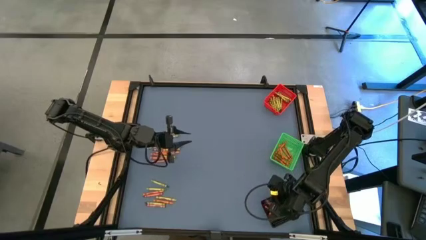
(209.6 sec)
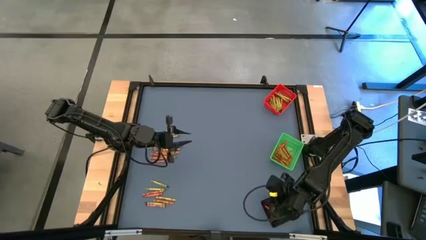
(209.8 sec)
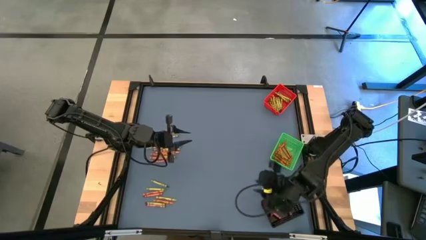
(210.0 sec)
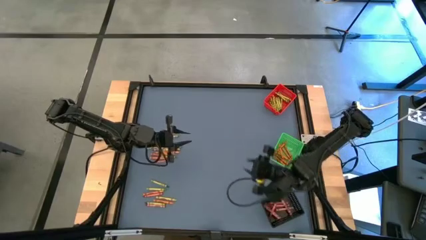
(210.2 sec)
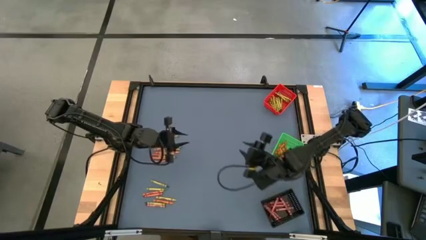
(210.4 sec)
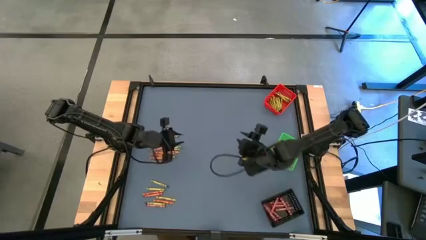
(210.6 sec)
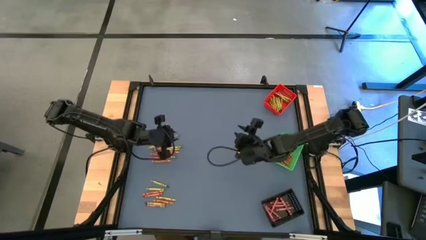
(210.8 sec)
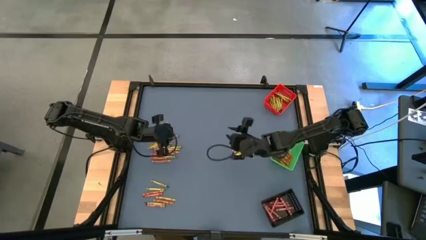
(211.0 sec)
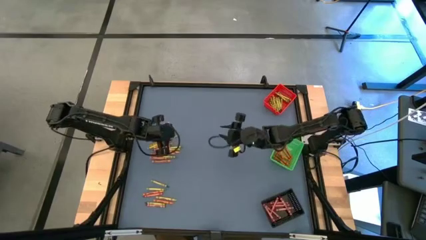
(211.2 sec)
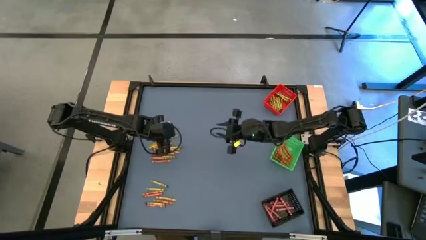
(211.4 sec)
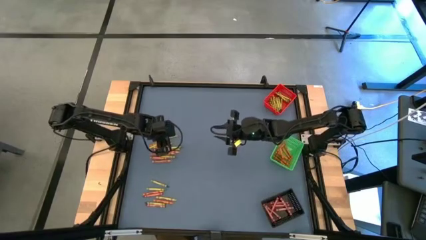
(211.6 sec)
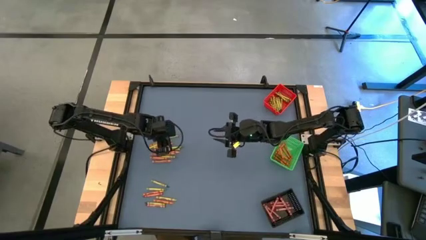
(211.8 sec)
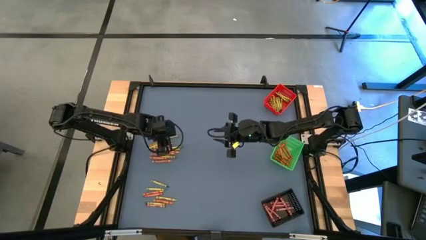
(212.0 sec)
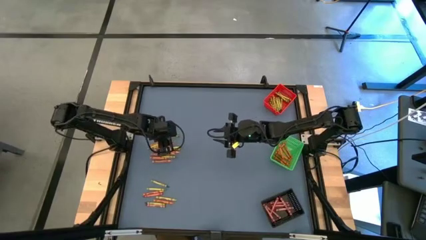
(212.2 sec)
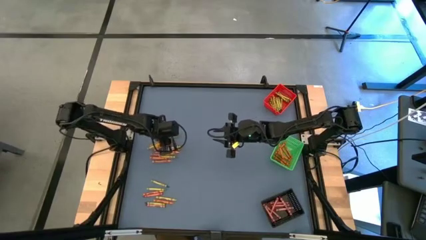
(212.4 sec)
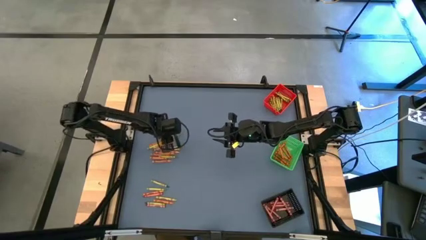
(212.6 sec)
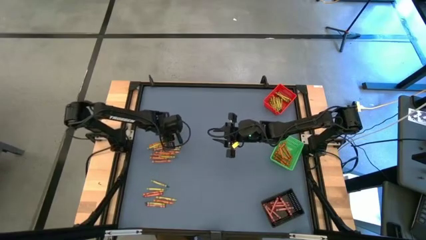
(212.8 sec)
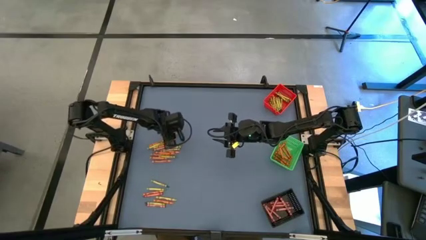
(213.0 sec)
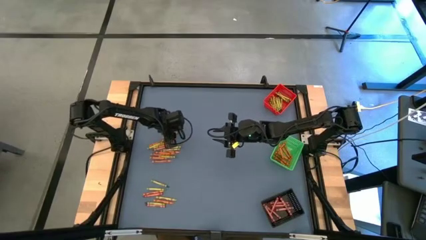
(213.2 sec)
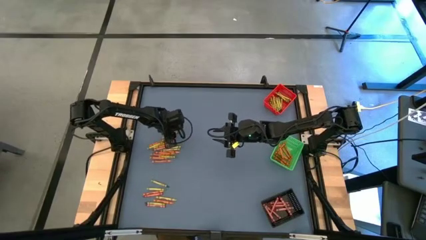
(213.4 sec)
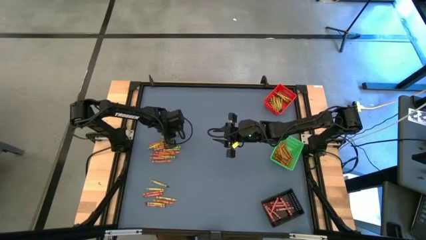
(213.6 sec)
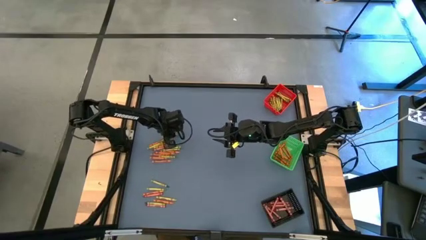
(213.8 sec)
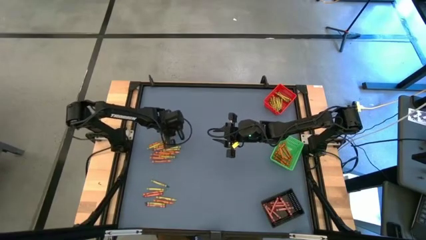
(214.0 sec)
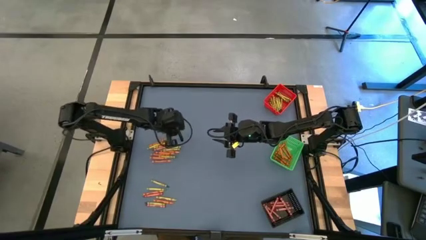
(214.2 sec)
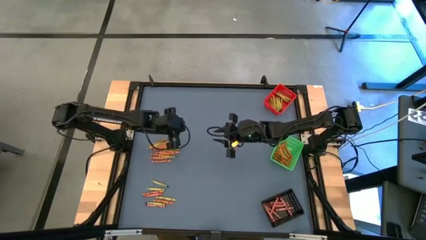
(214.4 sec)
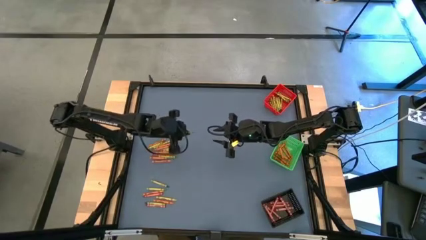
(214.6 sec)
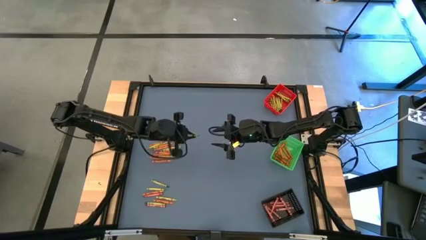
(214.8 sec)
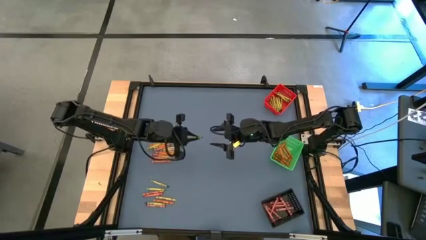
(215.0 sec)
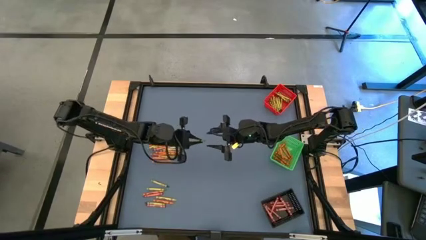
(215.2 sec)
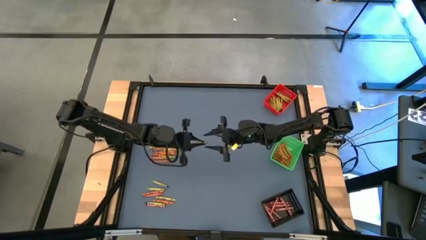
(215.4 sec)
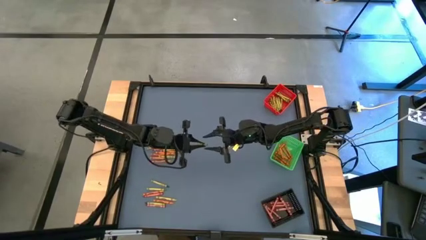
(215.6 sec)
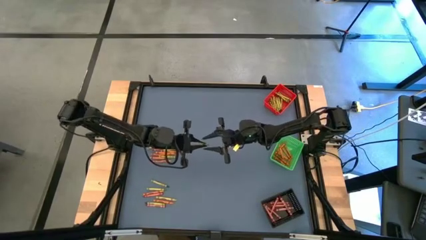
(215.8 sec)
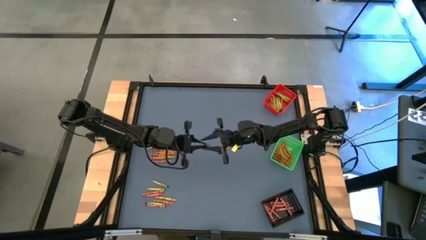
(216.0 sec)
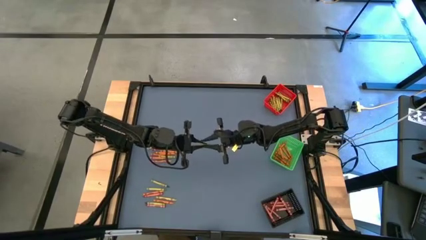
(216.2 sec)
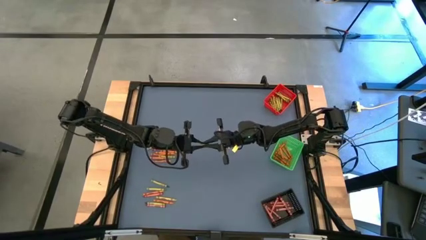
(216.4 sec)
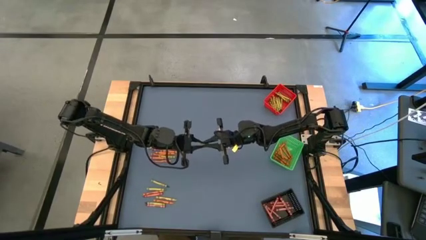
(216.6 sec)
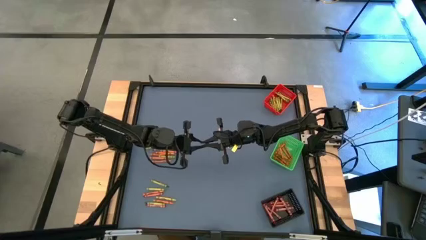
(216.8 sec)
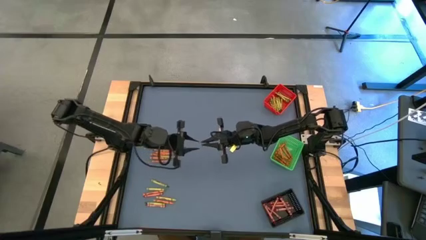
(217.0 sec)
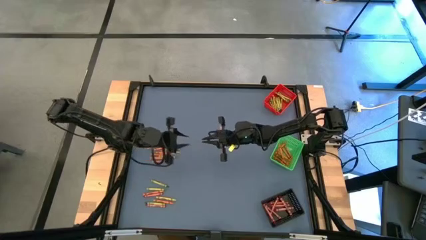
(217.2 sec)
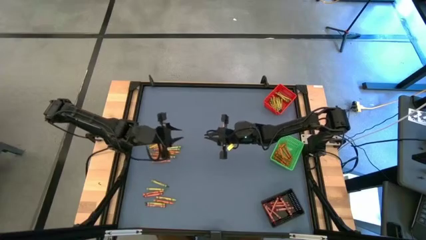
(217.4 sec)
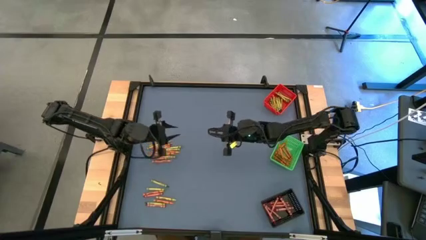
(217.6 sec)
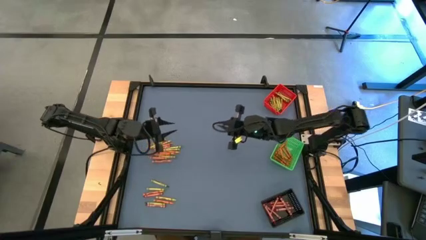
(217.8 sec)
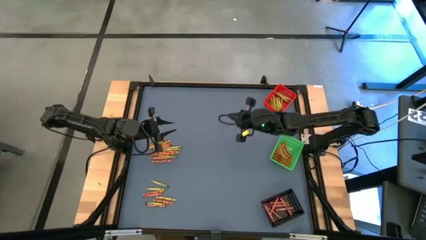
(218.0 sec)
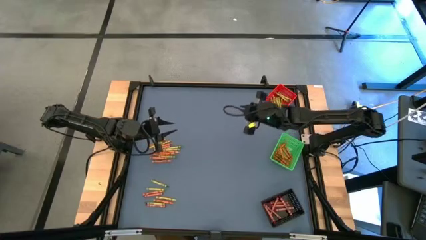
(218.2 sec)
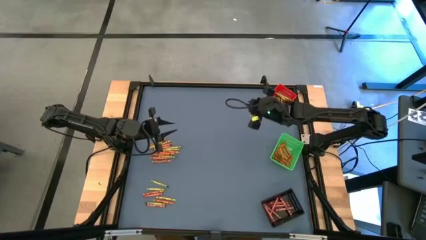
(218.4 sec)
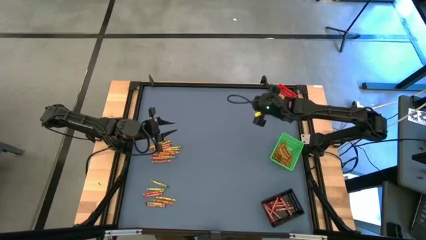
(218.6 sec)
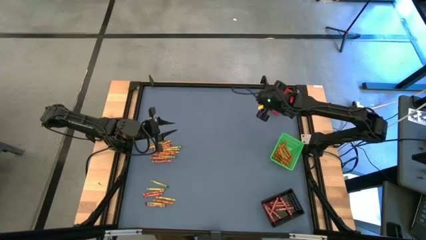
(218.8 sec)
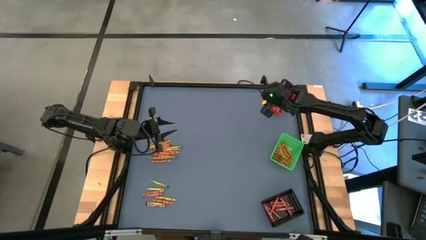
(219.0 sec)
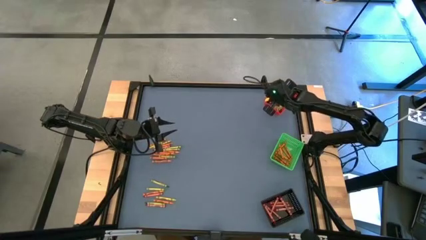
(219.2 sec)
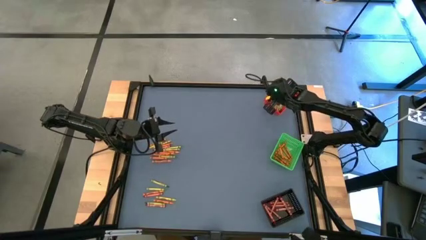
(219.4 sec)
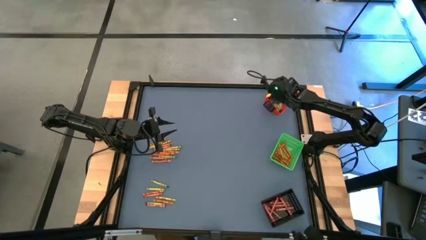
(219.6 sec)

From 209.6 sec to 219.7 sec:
Task: Sort crayons
Put the green crayon into the red bin

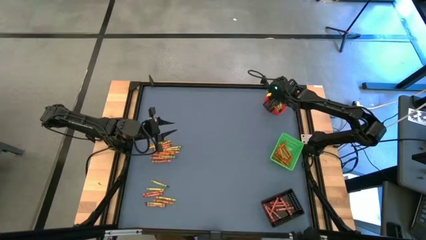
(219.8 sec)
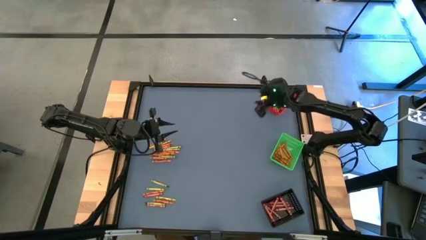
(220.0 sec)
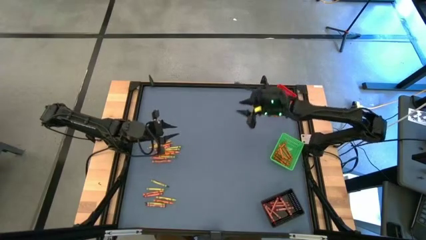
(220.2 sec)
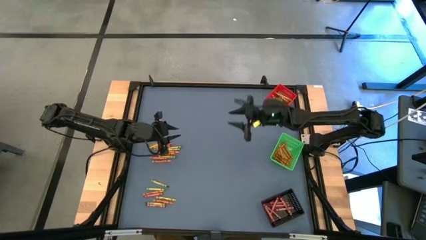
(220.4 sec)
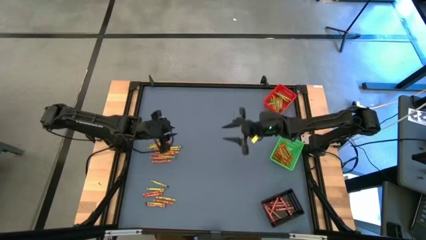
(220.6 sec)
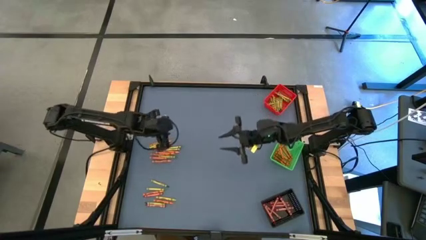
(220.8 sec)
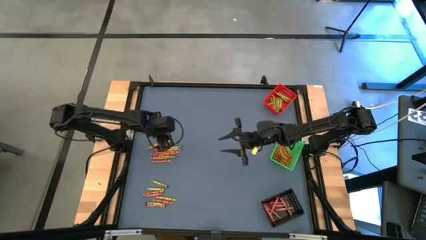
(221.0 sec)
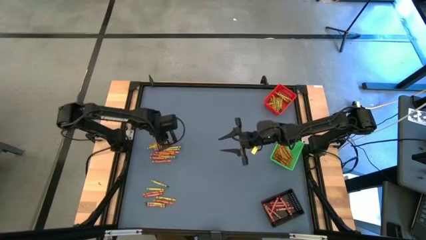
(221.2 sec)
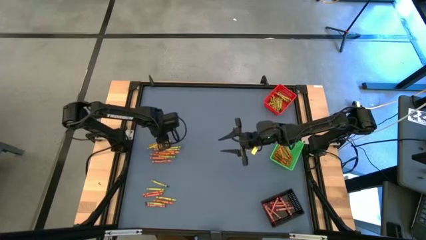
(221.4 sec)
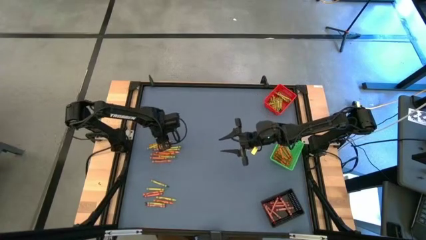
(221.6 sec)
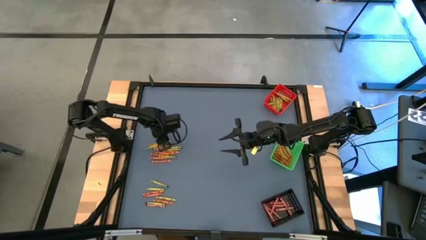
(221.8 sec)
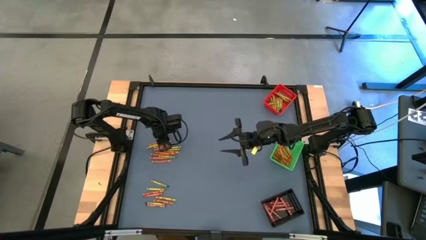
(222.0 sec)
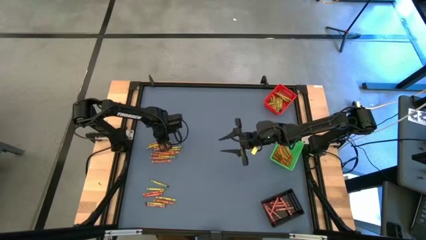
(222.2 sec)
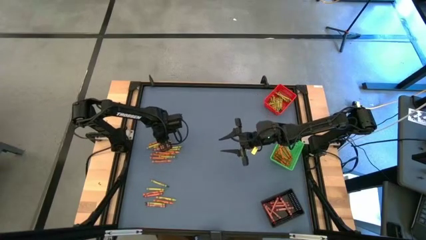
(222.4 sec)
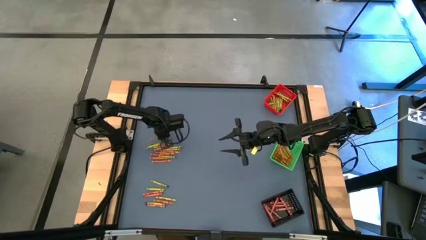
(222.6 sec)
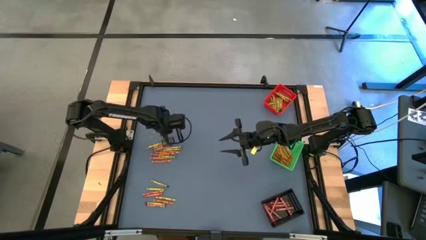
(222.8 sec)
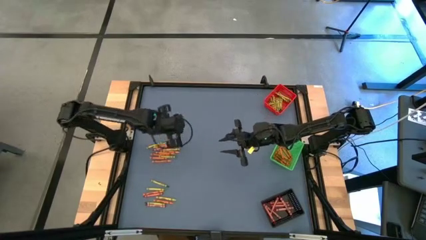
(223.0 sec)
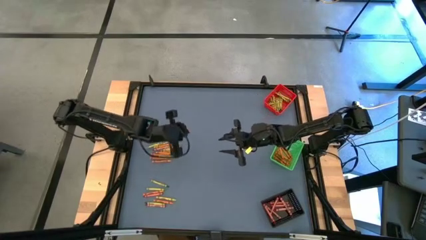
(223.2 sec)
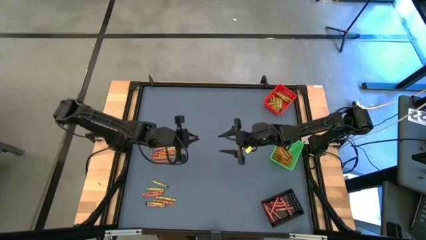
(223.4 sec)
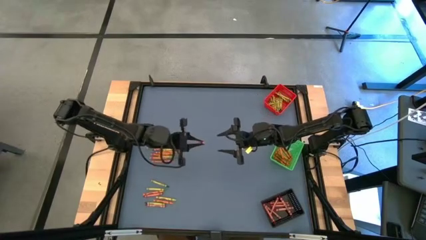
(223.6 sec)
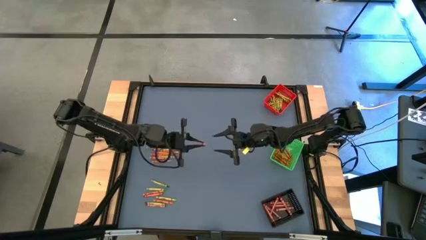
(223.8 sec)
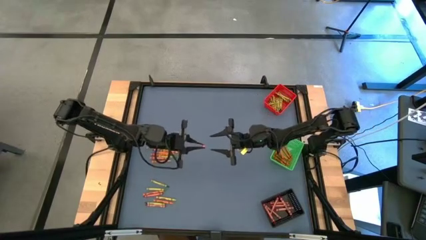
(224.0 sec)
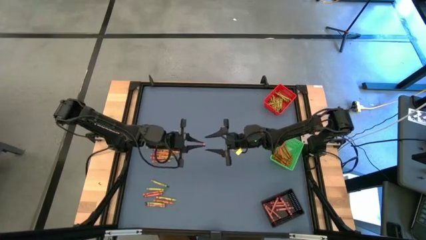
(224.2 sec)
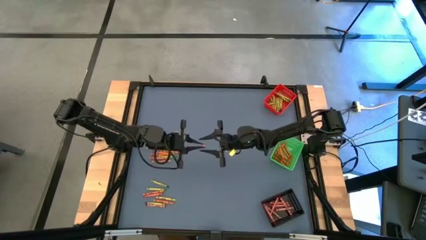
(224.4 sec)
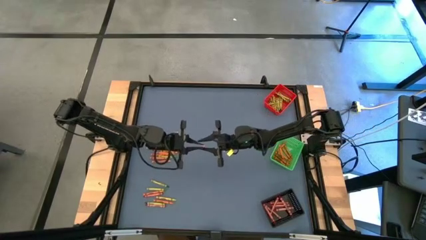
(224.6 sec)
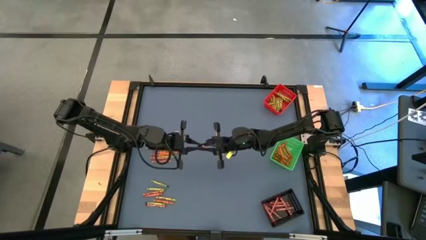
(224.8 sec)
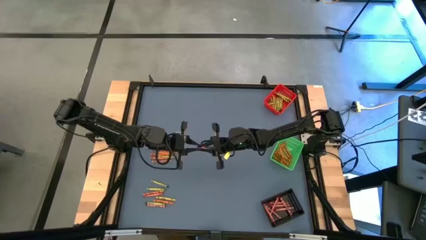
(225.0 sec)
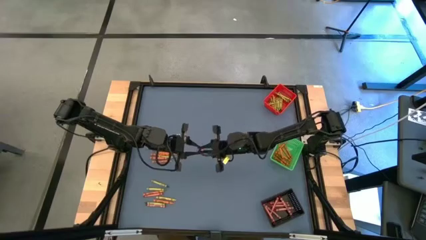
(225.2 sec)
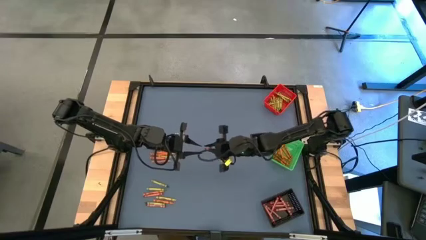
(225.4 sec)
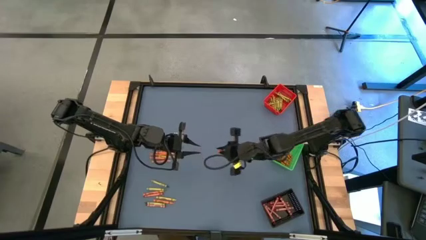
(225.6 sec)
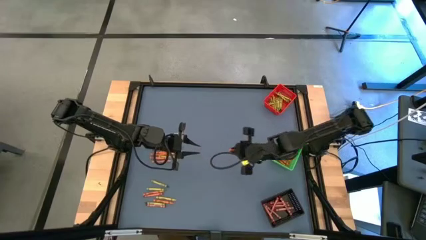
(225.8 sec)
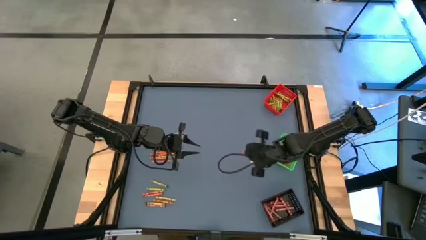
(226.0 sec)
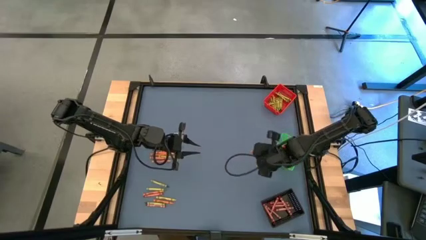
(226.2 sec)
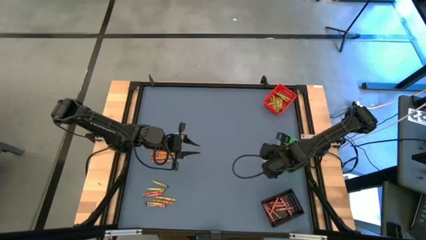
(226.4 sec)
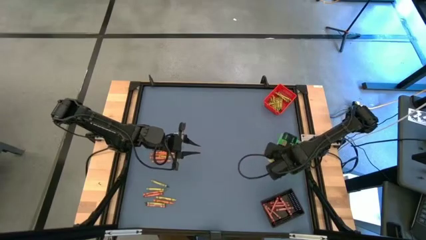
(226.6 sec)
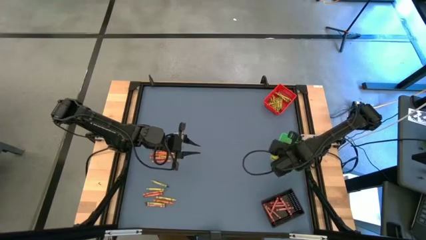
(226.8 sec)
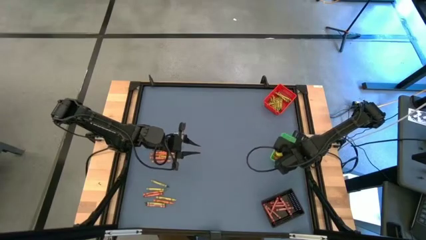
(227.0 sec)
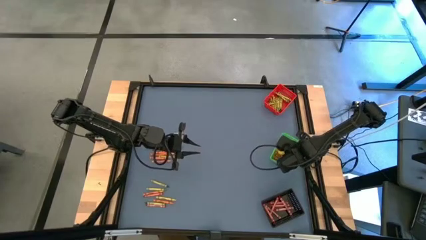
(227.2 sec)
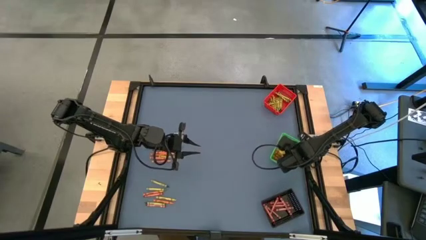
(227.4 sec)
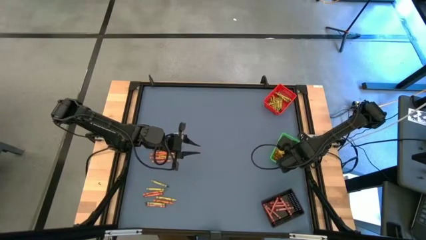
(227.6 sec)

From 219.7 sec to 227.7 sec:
Put the orange crayon into the green bin
